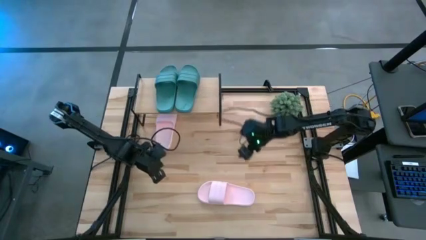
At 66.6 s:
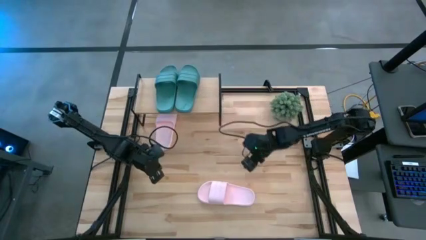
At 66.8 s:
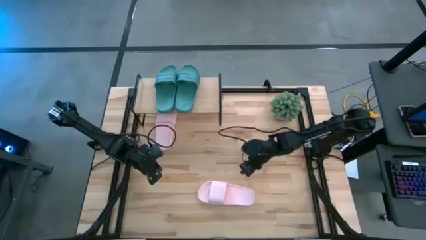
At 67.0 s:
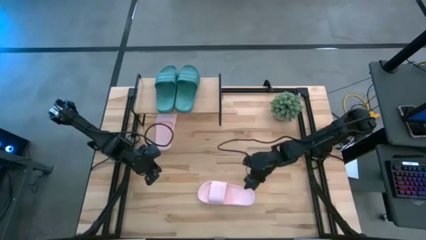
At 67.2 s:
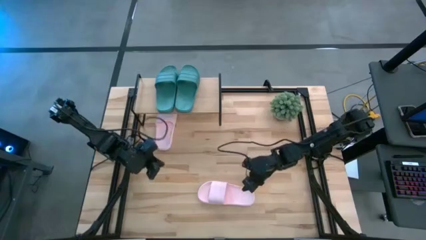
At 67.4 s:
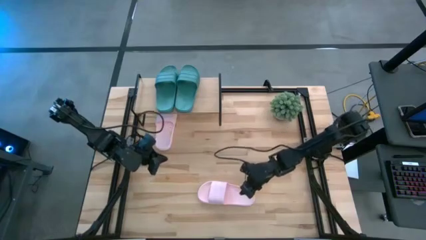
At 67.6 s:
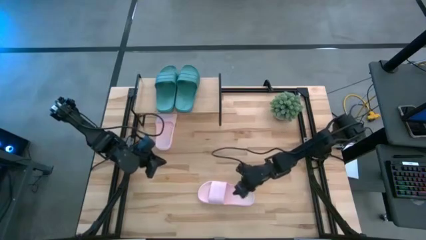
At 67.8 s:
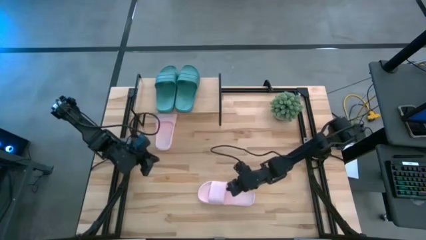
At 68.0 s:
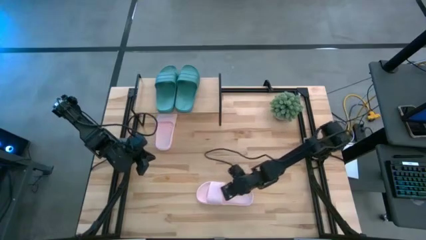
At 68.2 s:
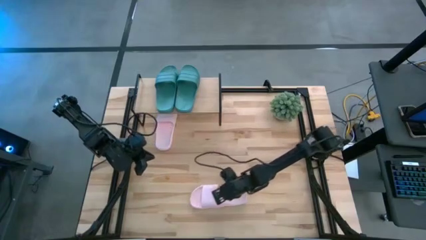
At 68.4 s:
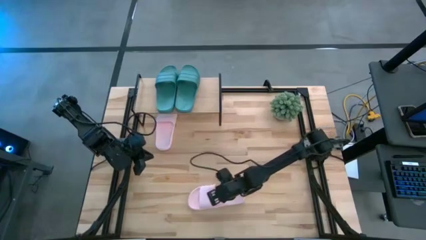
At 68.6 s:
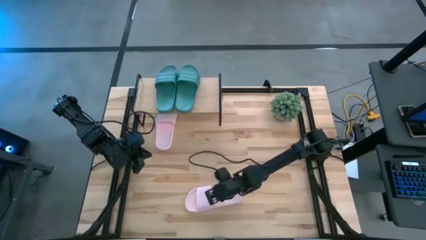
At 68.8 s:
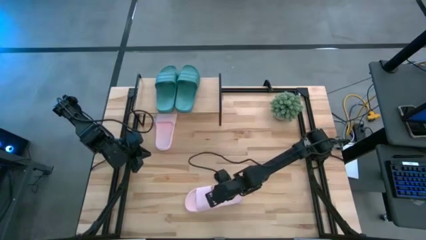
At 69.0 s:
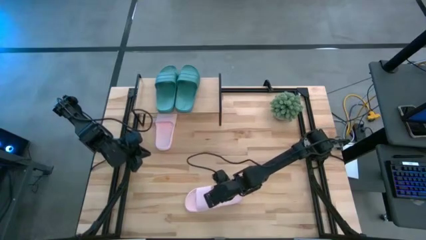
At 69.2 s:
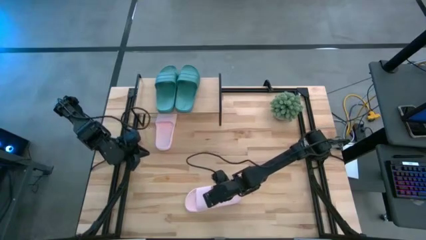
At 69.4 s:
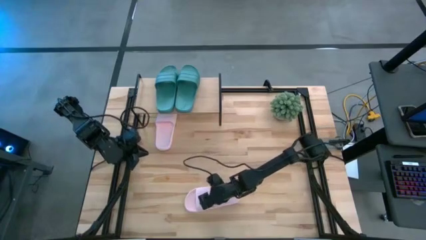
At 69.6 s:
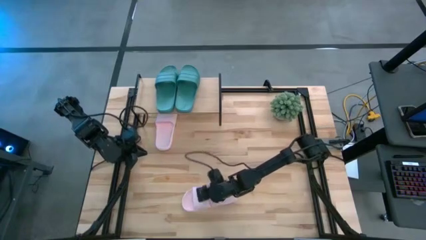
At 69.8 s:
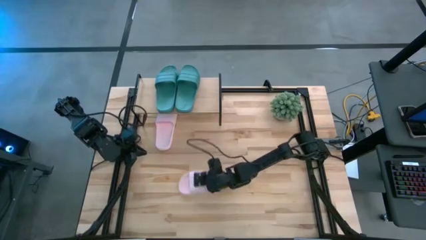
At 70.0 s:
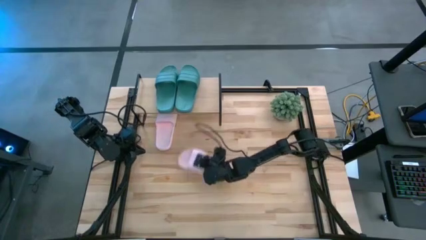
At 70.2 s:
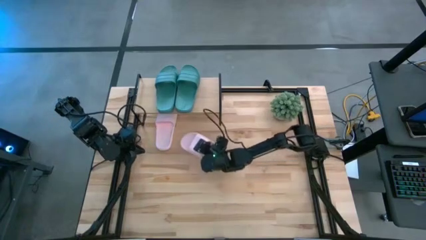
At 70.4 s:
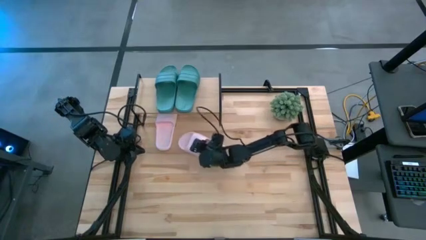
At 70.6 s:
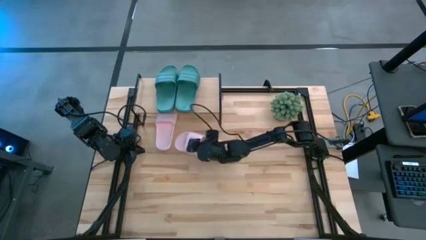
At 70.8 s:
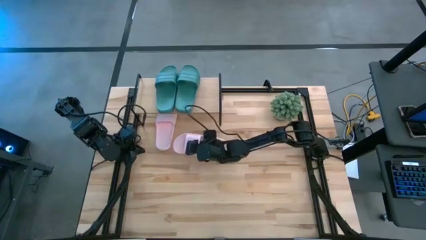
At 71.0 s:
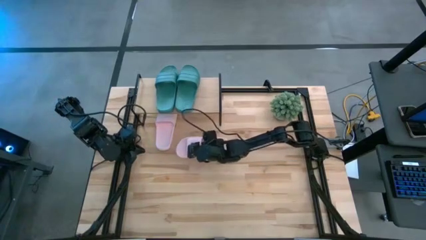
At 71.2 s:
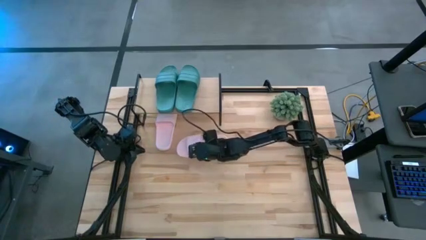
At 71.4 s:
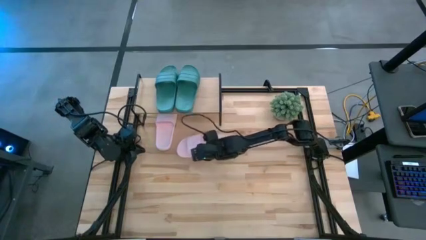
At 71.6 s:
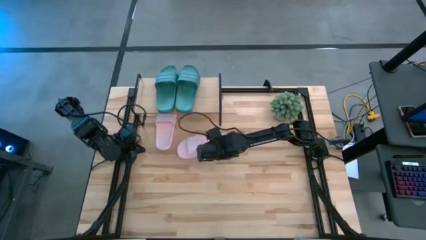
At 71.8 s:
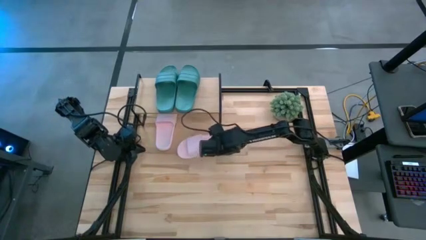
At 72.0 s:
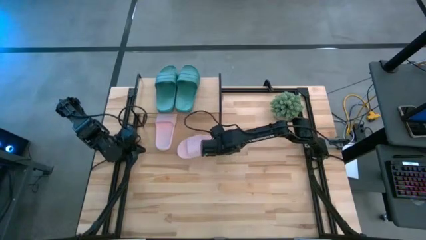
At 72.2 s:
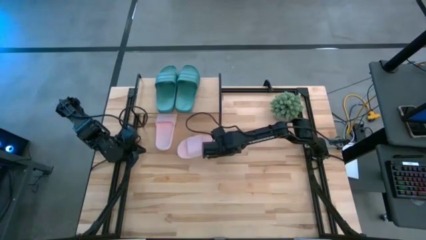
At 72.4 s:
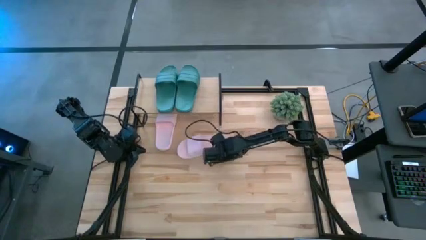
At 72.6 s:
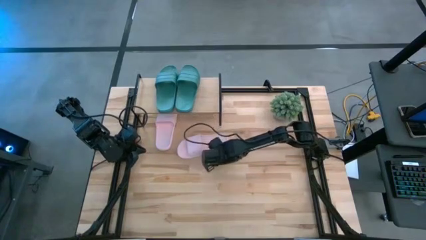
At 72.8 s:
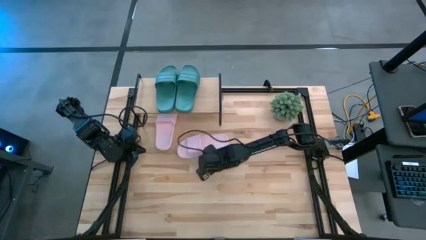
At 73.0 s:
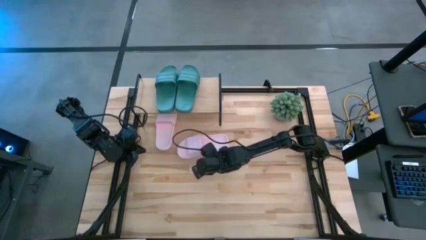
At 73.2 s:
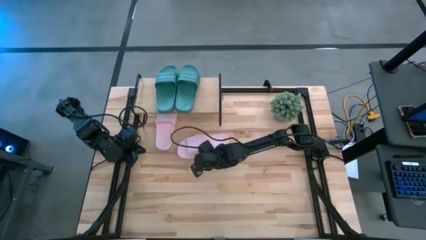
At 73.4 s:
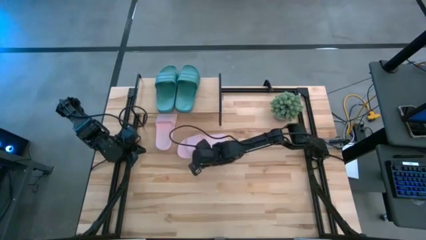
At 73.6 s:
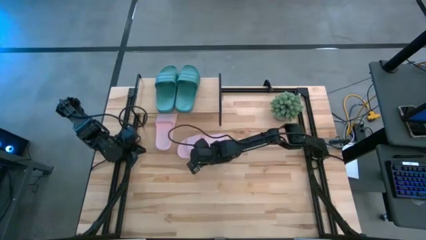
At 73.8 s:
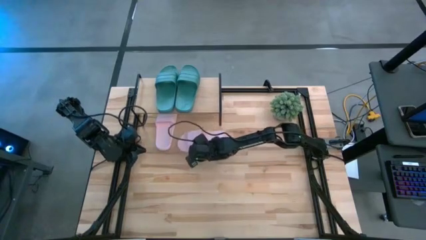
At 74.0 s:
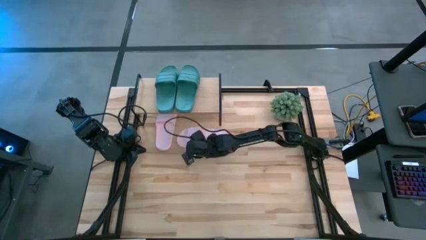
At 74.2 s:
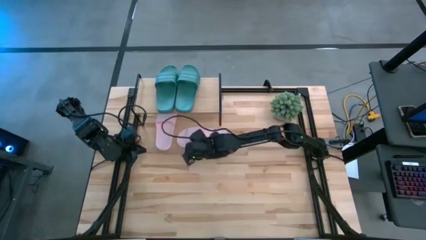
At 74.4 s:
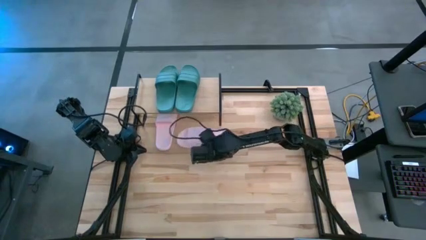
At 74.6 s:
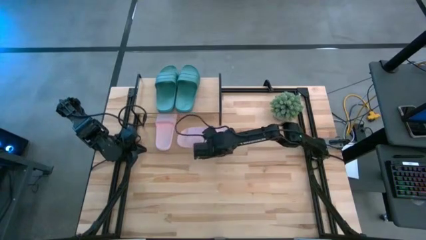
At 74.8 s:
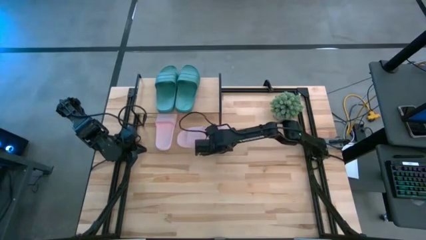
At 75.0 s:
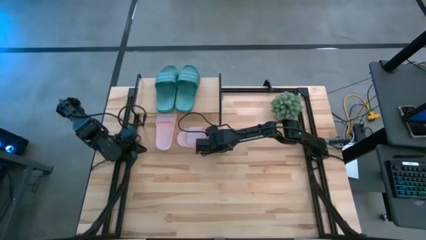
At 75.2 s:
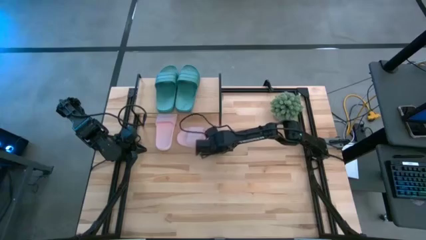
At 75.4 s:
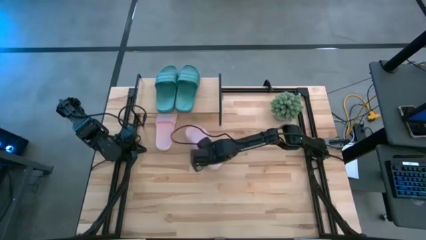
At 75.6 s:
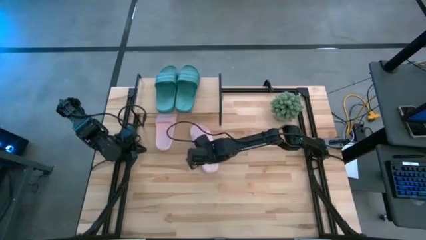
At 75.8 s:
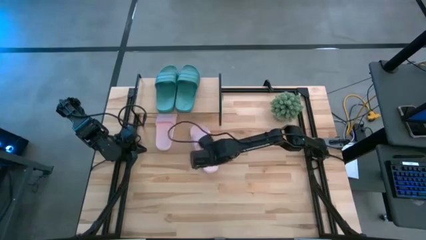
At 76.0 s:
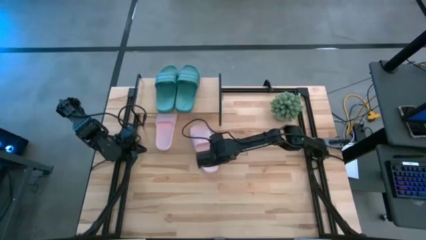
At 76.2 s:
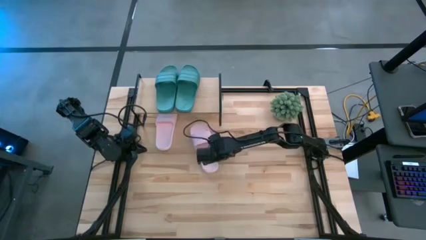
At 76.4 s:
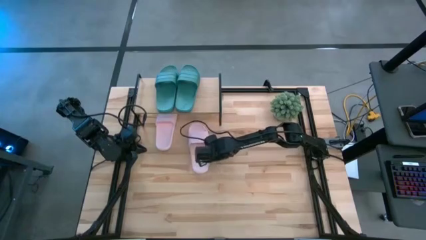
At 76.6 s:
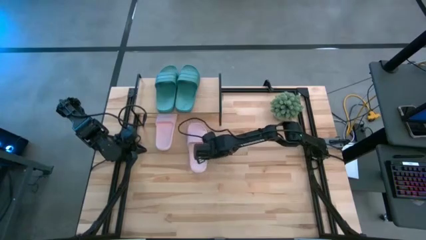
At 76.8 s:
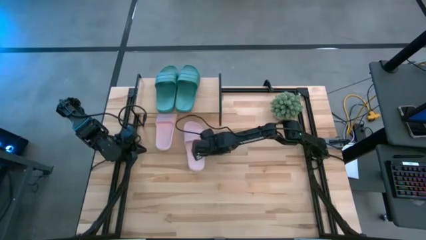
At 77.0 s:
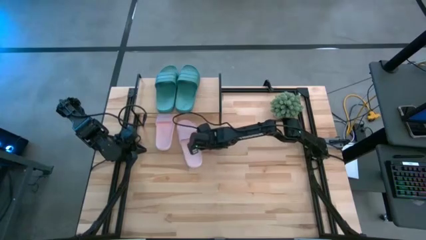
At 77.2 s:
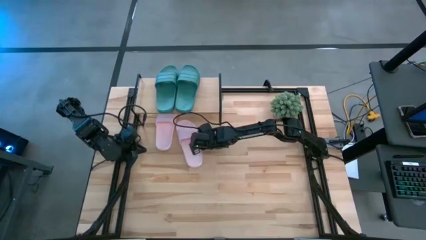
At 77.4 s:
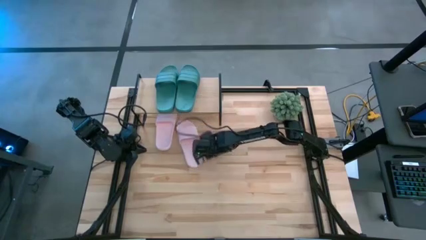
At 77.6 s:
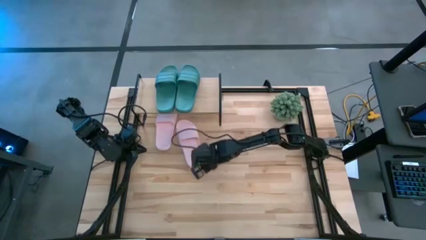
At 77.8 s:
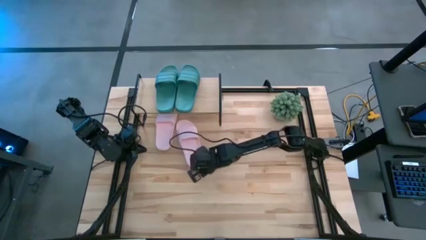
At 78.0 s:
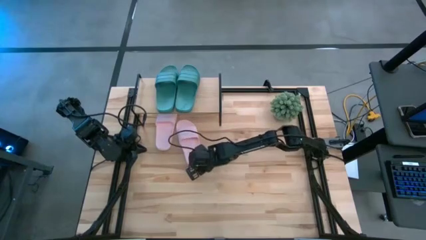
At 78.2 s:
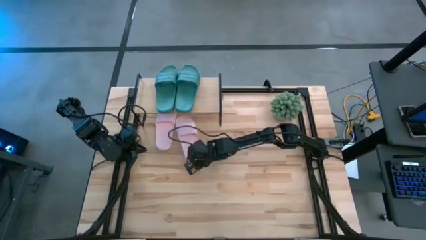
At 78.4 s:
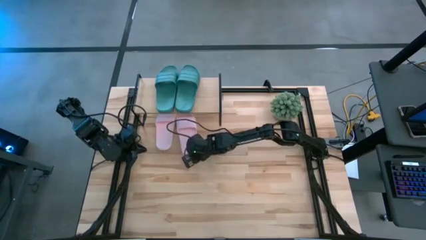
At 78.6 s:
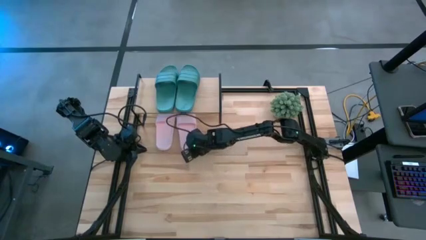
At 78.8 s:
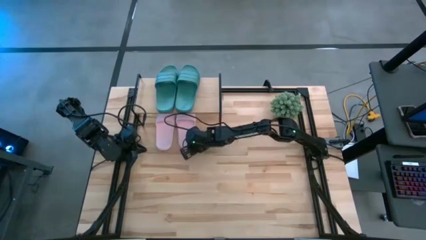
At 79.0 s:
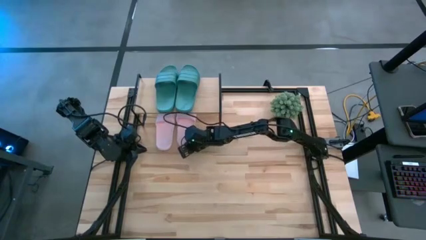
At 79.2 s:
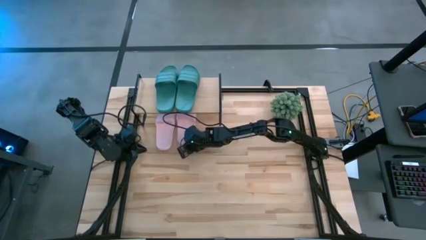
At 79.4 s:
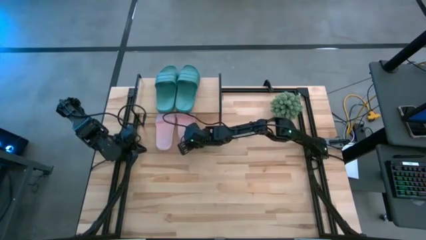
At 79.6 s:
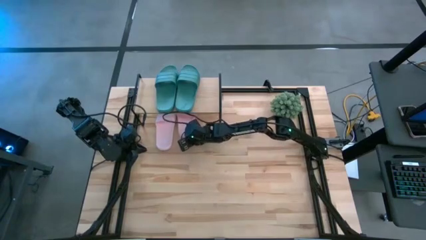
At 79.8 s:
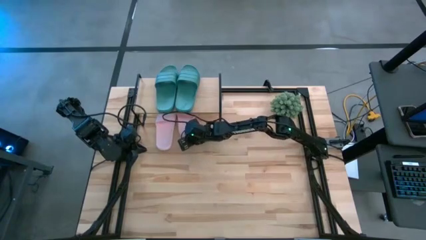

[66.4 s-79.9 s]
Task: Pick and place slides into the shelf
Put the pink slide under the shelf
